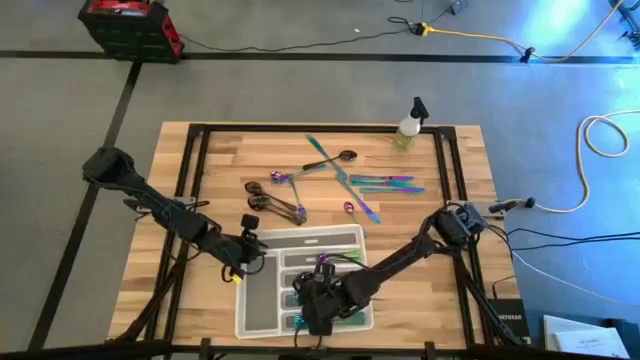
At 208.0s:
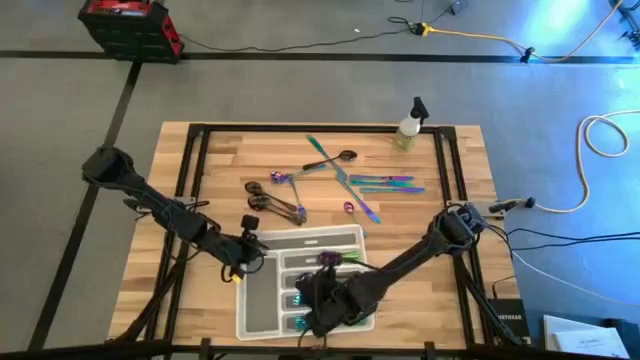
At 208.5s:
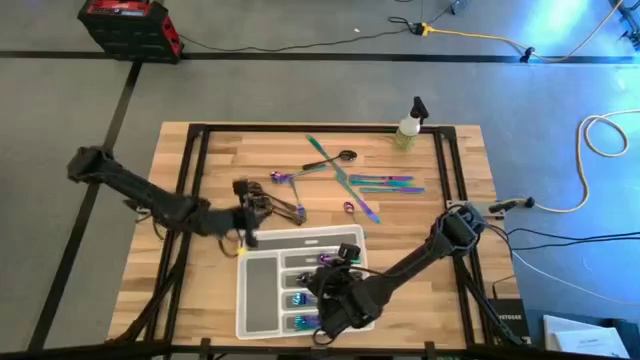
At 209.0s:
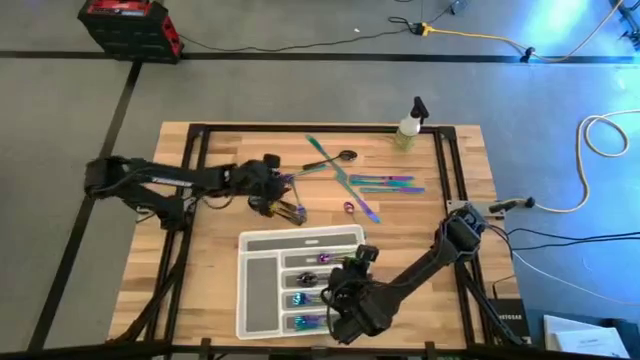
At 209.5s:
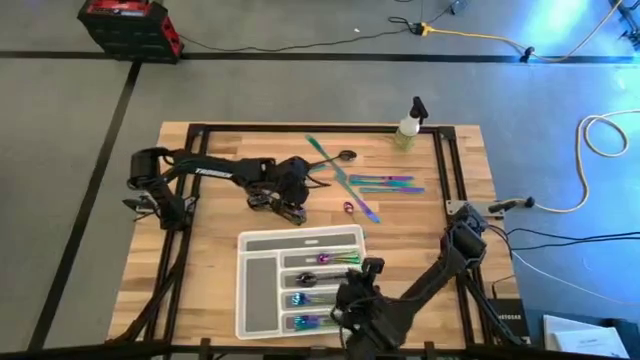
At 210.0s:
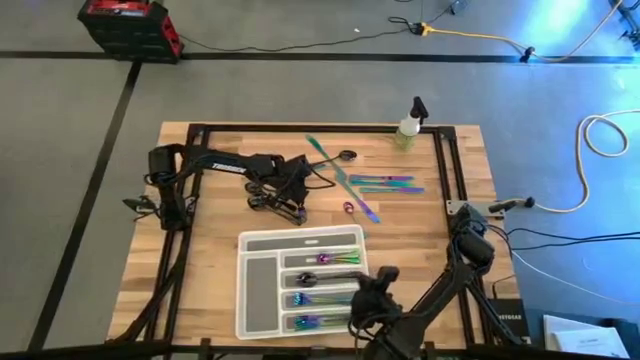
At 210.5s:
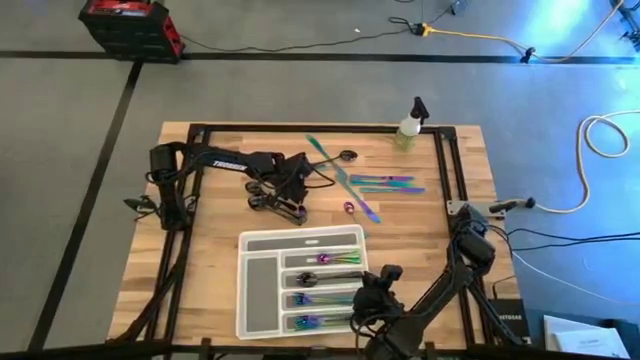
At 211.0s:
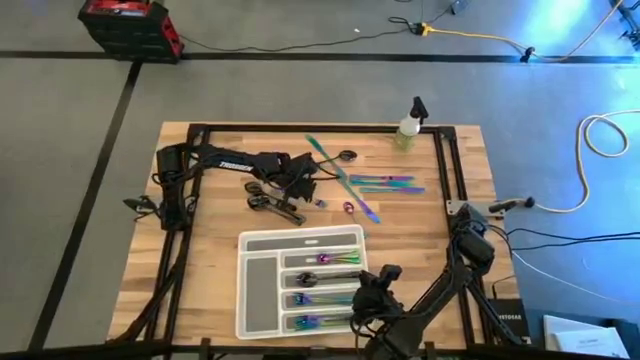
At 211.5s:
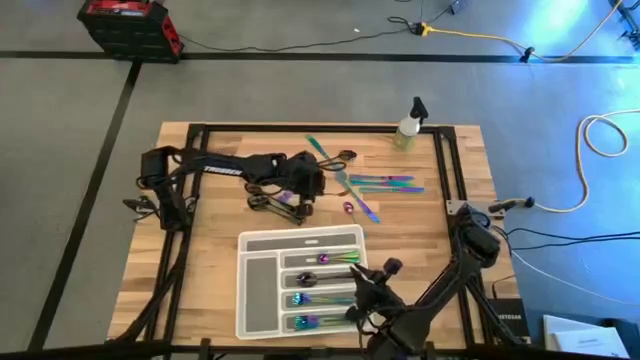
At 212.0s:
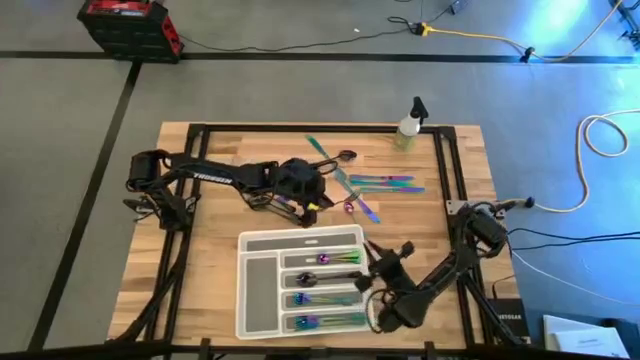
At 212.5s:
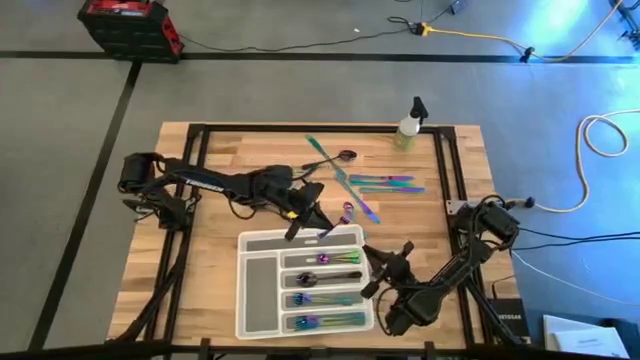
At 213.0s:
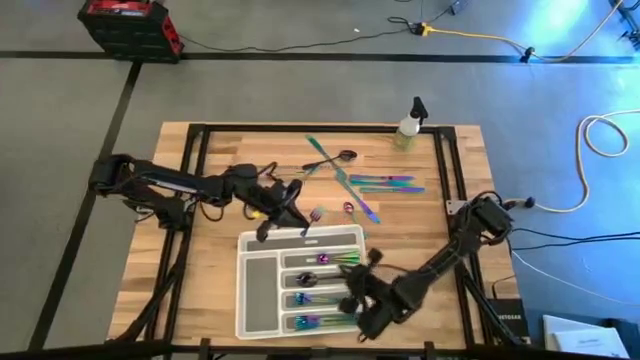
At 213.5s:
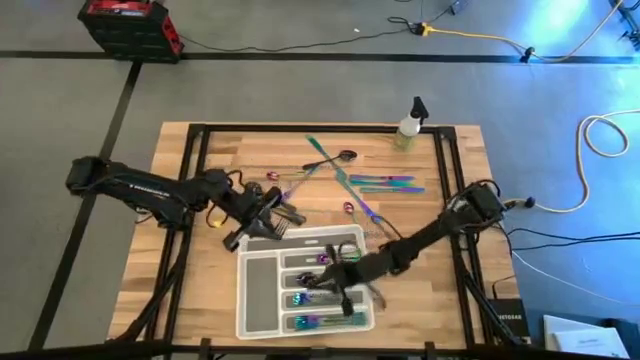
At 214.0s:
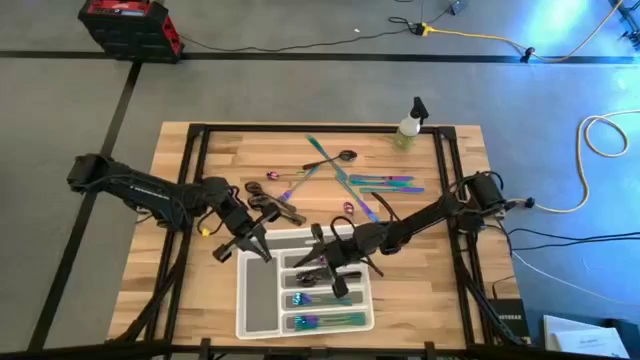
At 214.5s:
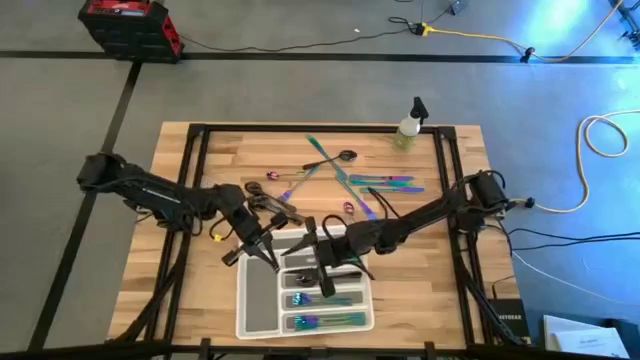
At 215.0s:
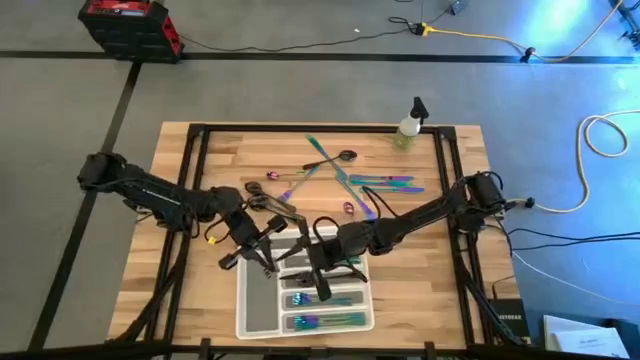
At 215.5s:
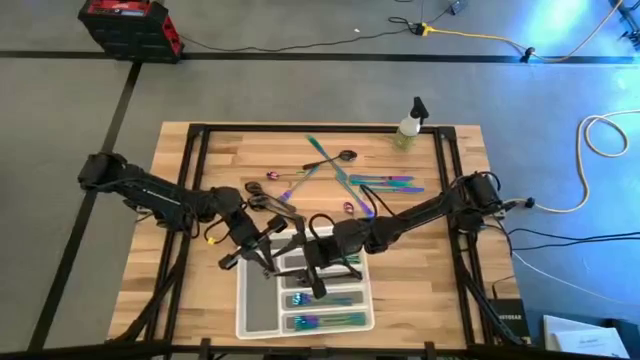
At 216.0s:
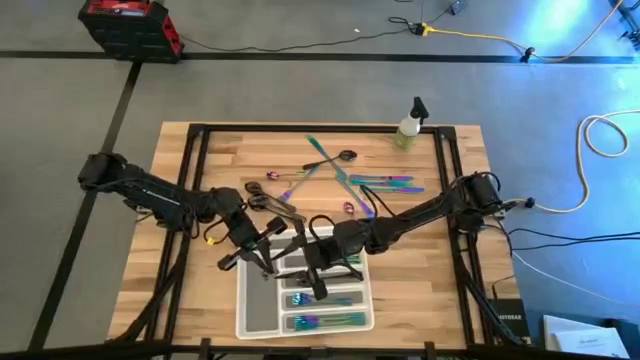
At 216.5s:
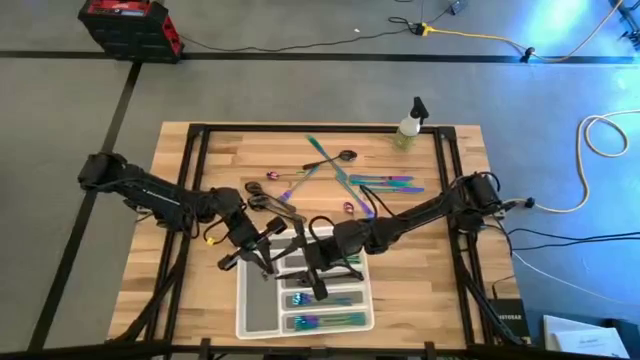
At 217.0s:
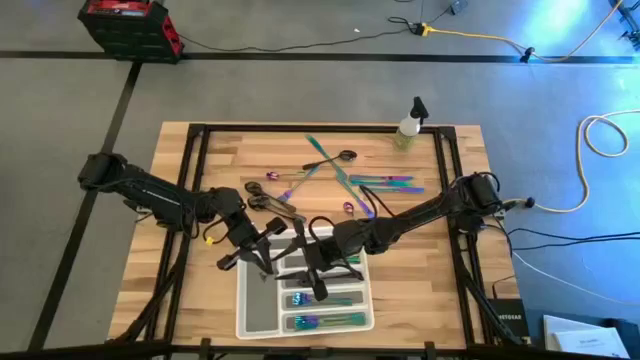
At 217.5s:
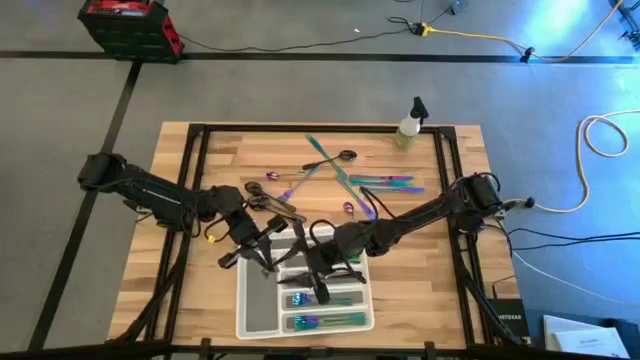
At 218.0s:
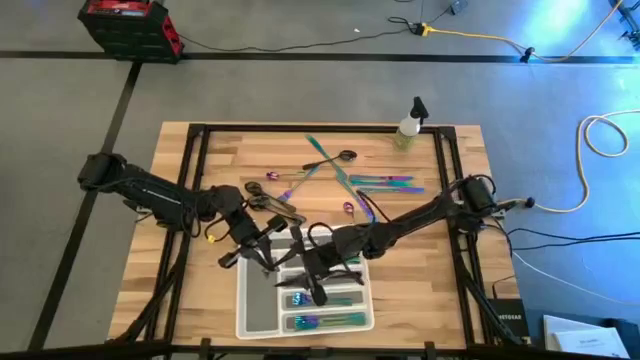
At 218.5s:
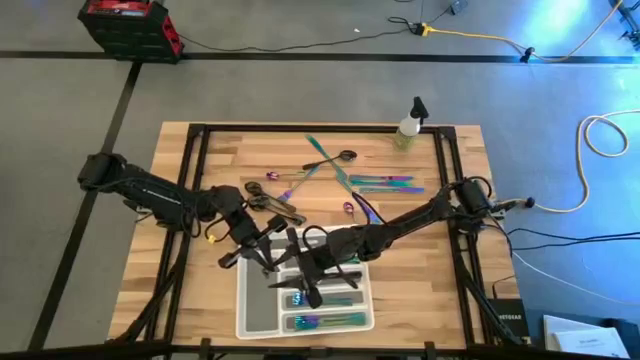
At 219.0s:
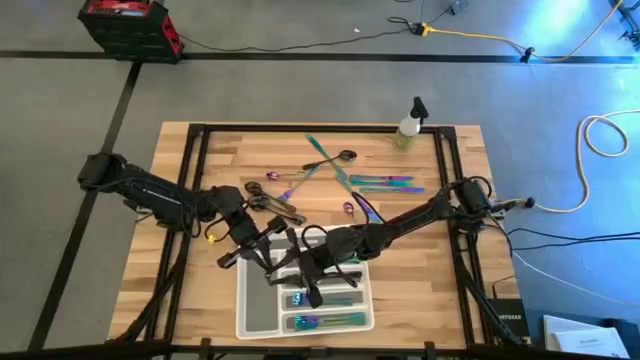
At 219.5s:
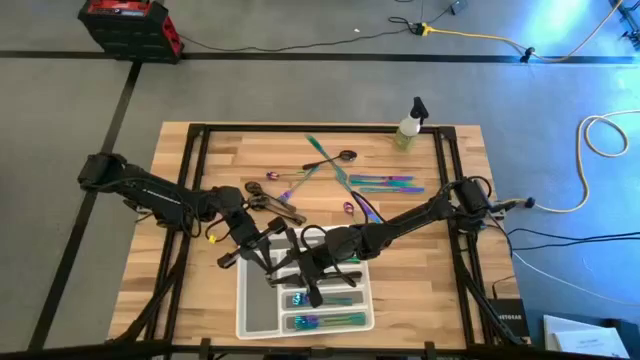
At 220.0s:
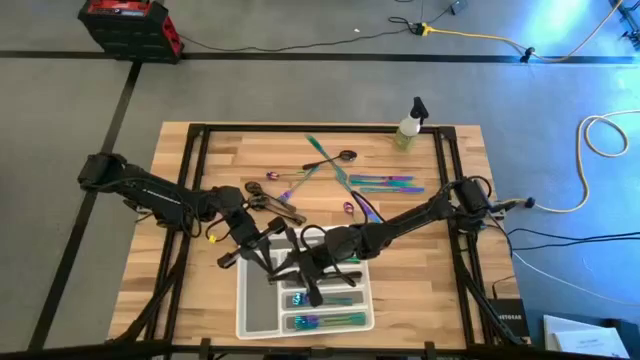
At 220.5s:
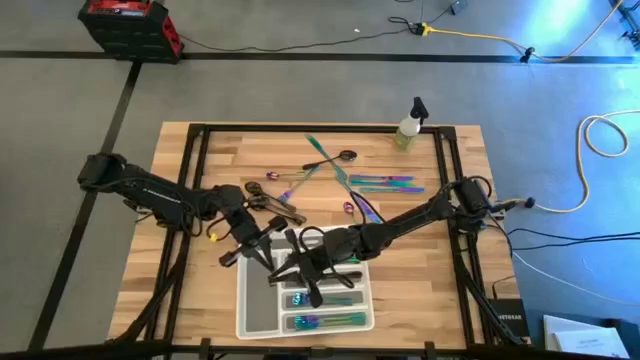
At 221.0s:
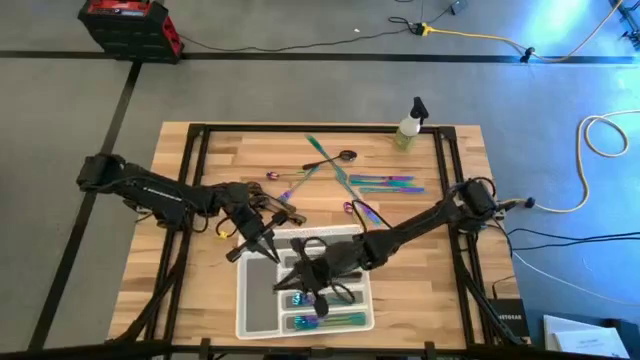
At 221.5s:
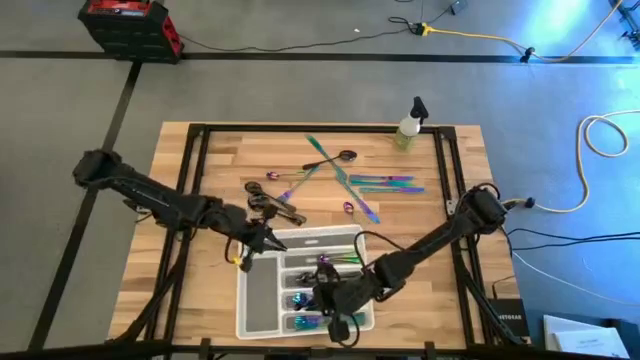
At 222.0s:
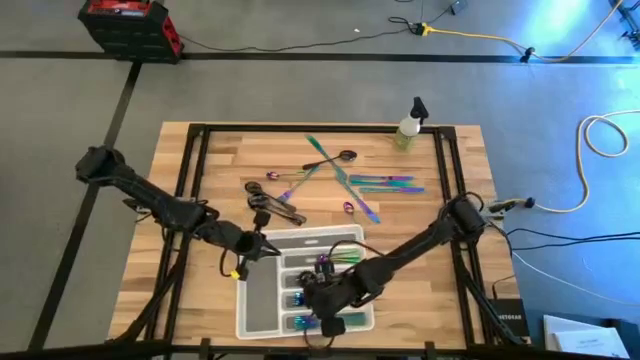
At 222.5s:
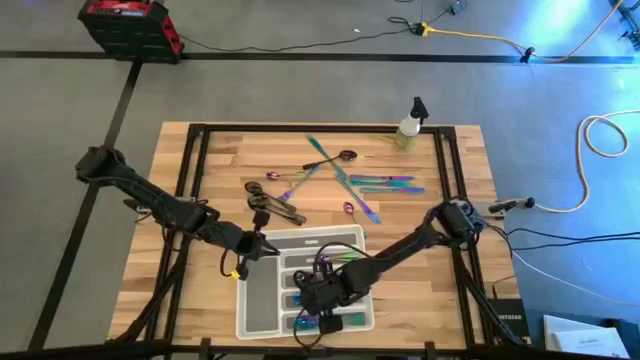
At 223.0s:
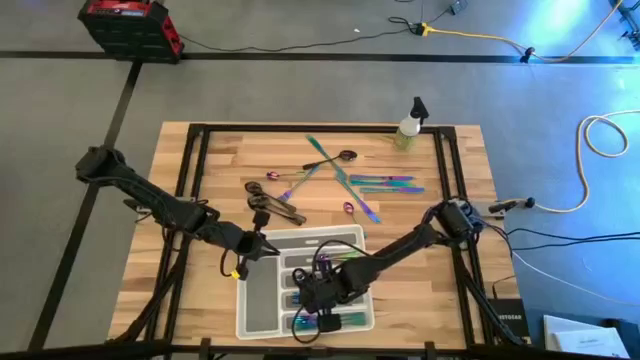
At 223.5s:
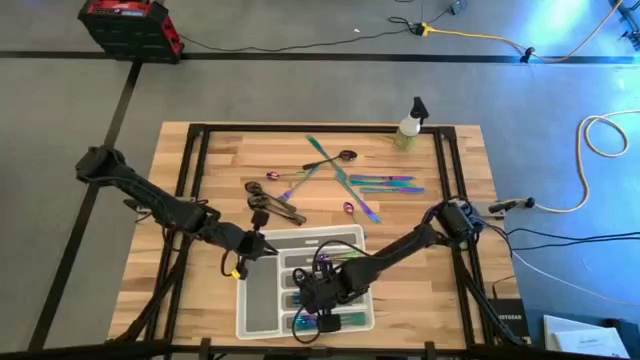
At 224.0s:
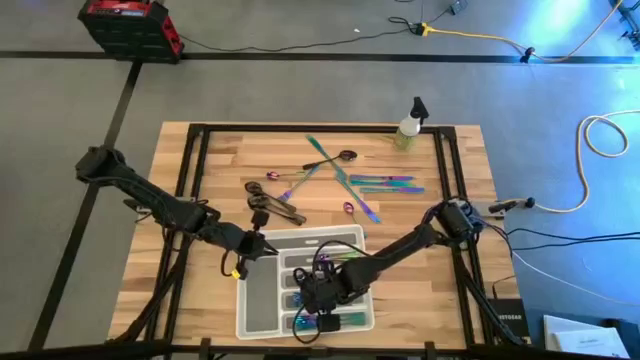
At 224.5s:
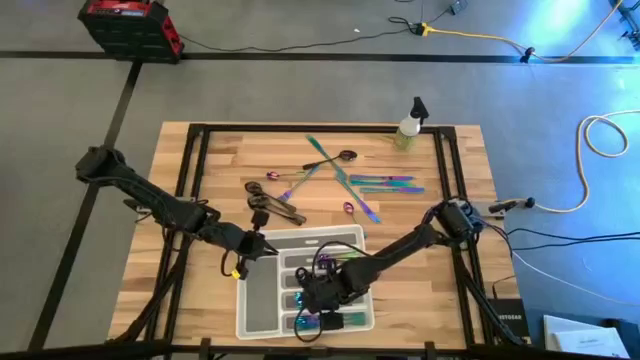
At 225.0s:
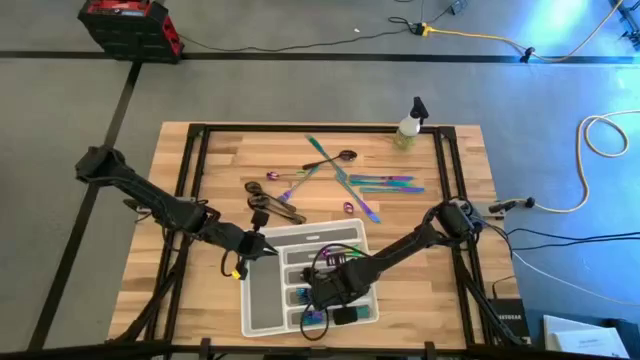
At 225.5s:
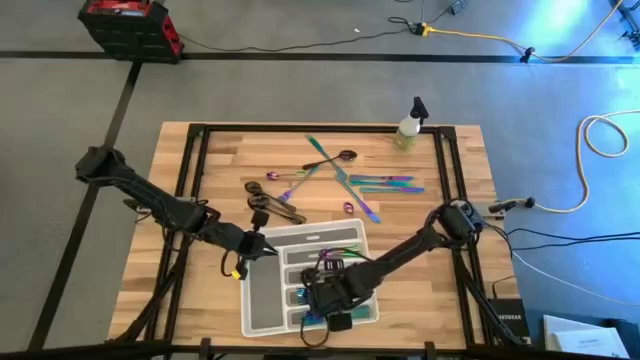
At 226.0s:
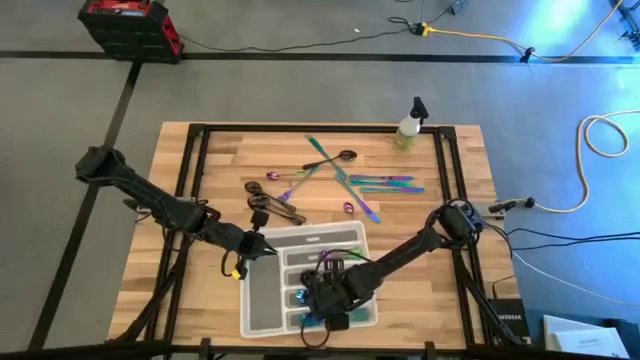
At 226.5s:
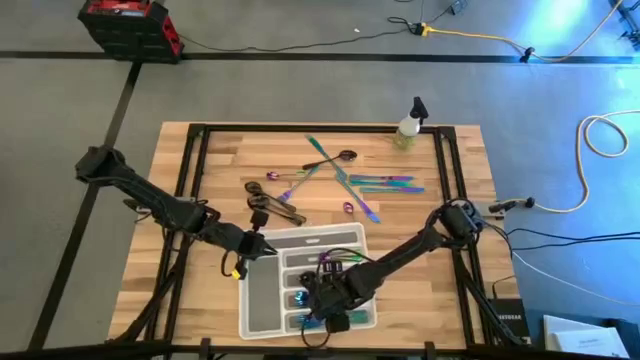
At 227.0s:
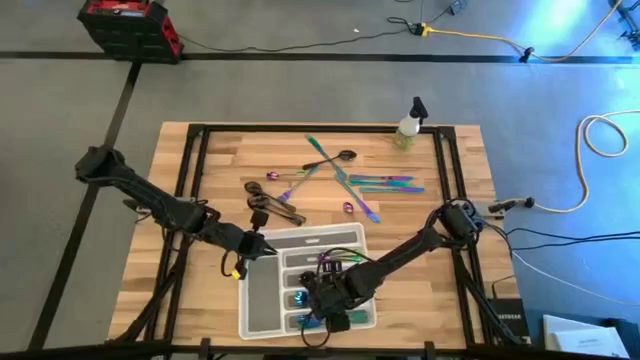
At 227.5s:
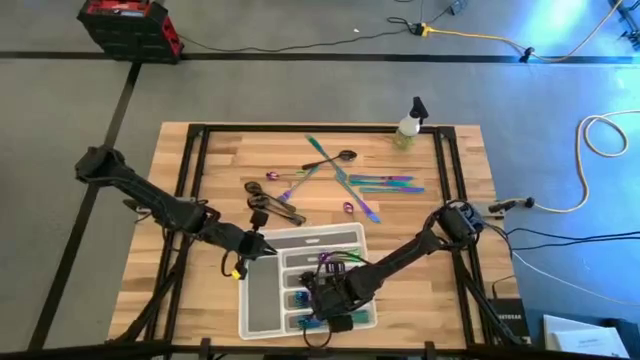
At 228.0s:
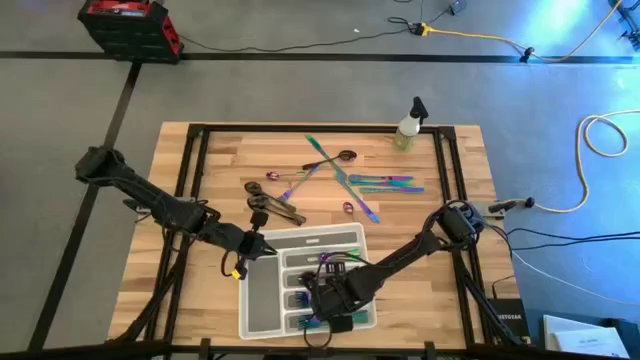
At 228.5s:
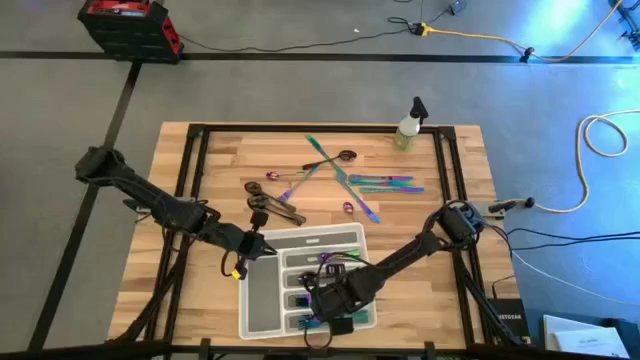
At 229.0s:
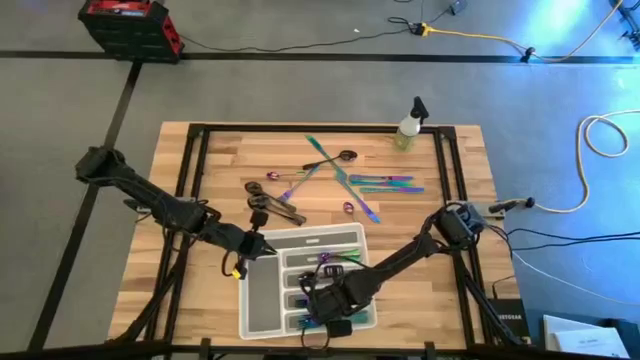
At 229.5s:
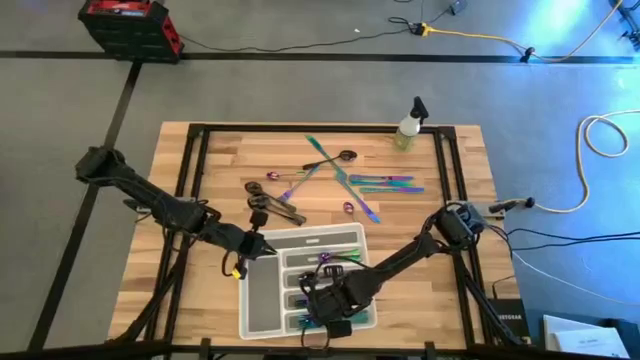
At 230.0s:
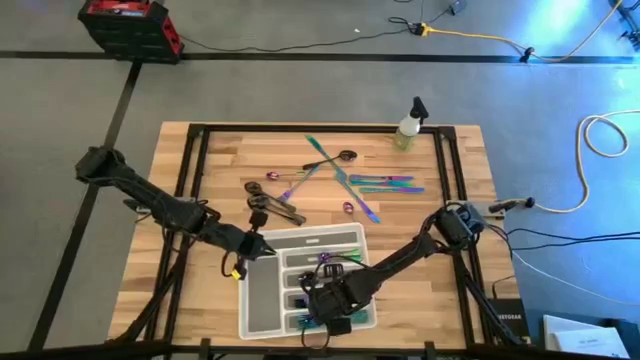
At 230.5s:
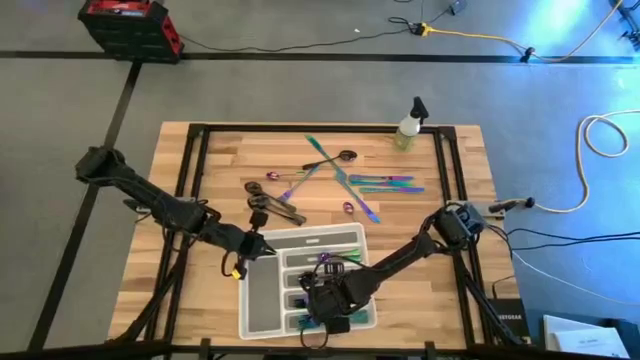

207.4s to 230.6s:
Task: Sort silverware
Put the blue fork into the white silverware tray
